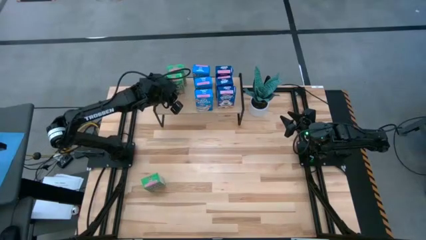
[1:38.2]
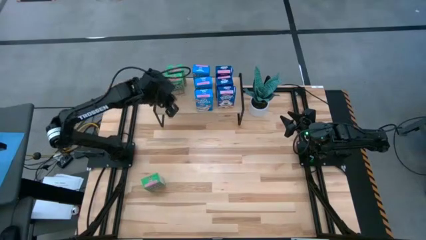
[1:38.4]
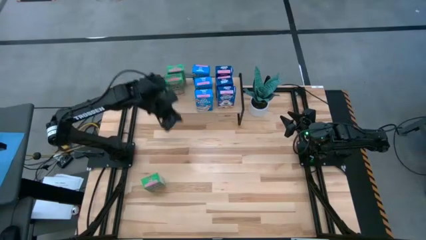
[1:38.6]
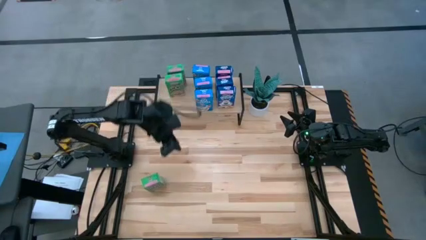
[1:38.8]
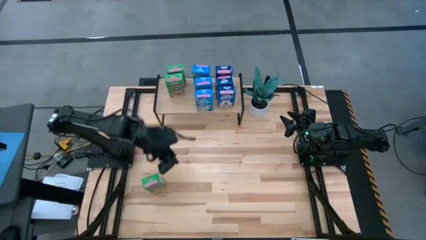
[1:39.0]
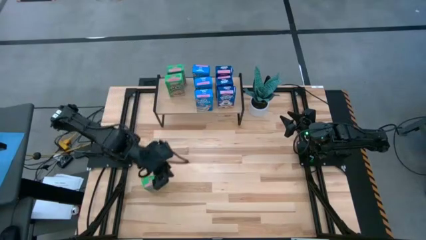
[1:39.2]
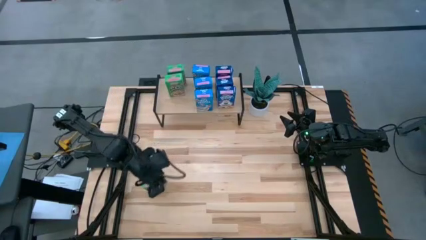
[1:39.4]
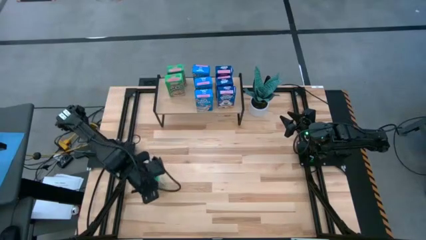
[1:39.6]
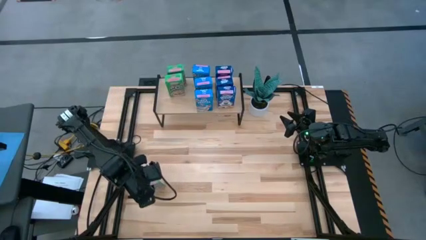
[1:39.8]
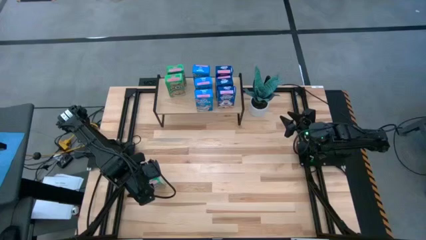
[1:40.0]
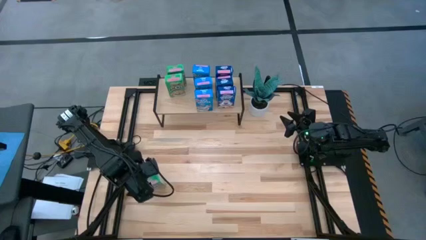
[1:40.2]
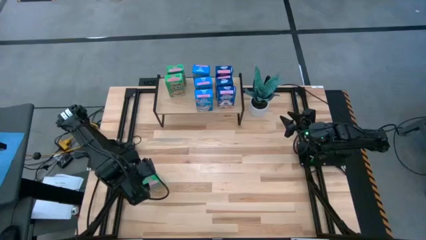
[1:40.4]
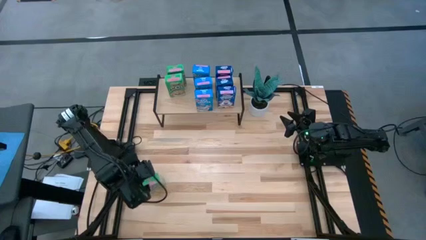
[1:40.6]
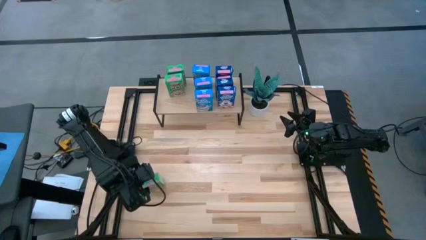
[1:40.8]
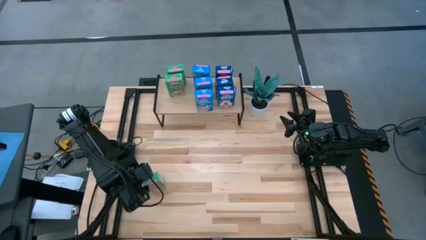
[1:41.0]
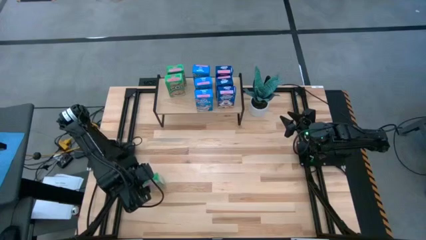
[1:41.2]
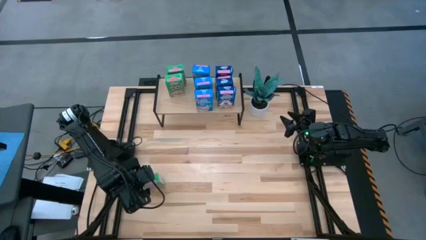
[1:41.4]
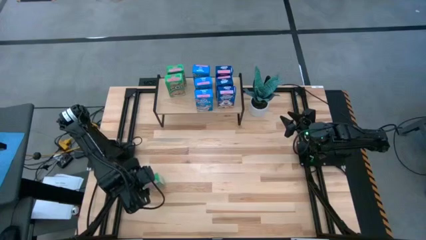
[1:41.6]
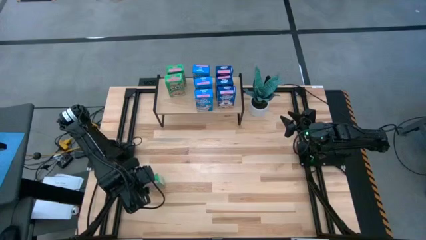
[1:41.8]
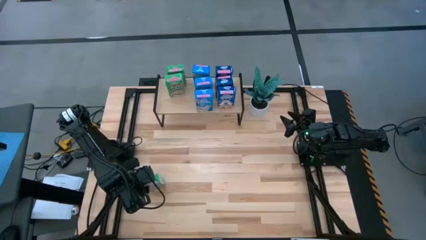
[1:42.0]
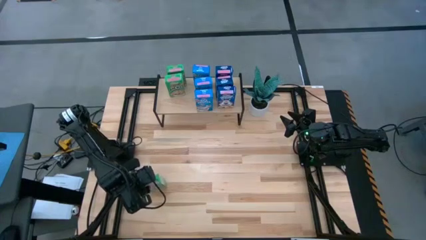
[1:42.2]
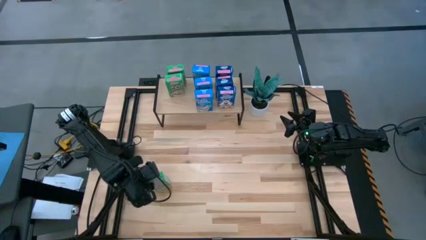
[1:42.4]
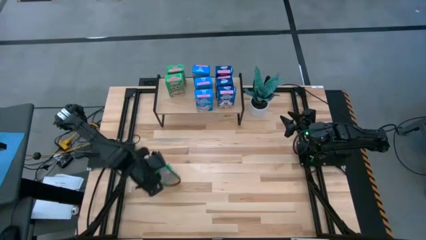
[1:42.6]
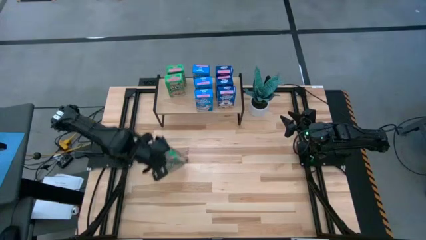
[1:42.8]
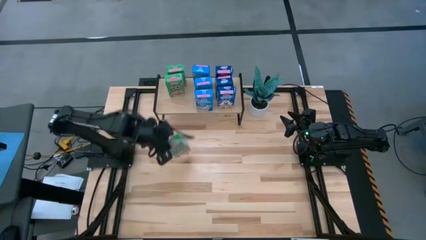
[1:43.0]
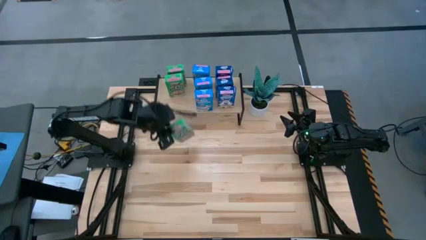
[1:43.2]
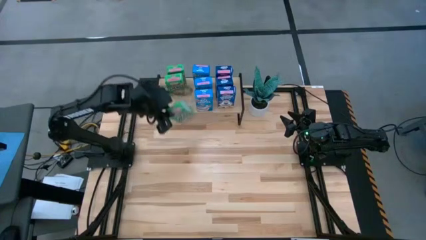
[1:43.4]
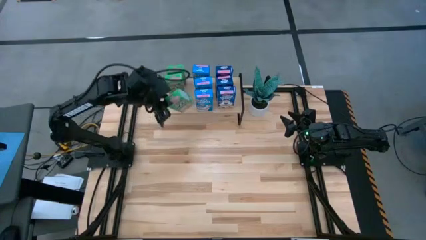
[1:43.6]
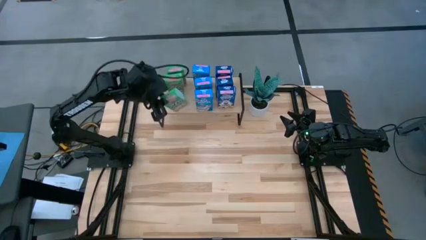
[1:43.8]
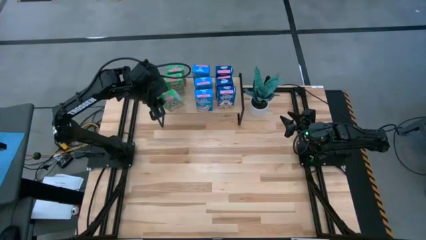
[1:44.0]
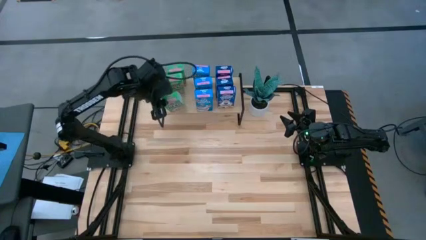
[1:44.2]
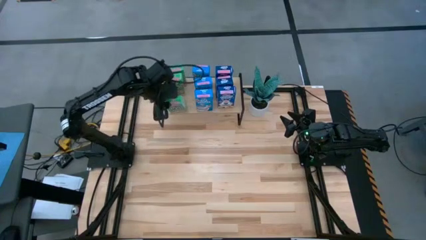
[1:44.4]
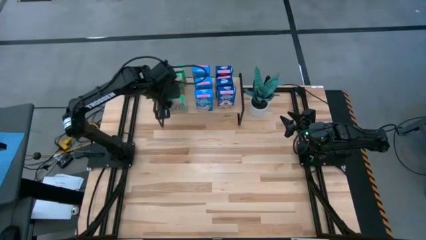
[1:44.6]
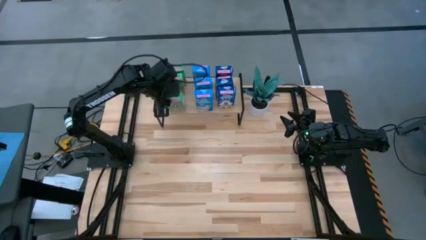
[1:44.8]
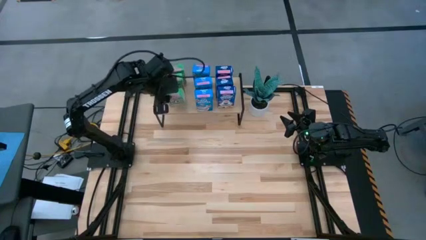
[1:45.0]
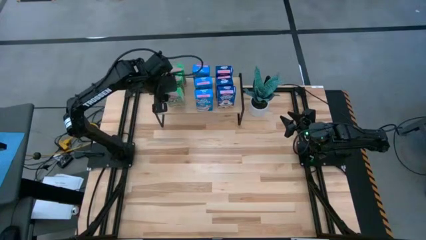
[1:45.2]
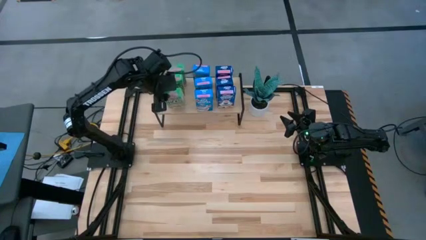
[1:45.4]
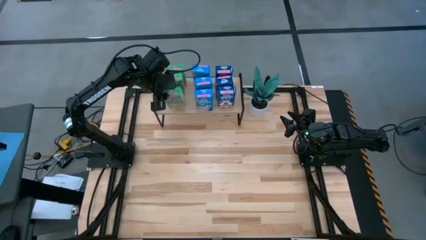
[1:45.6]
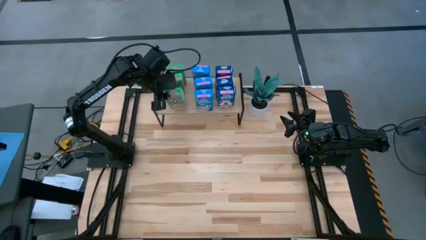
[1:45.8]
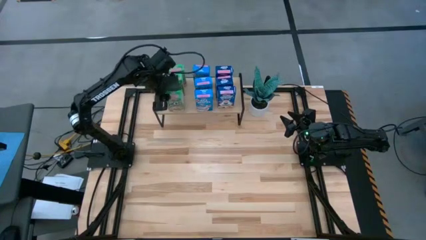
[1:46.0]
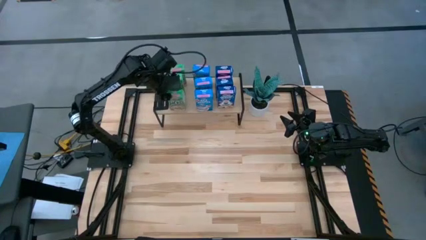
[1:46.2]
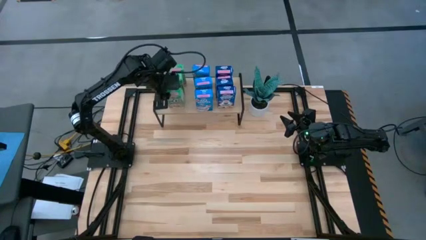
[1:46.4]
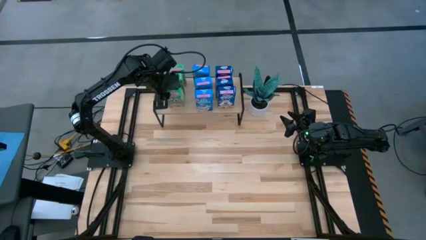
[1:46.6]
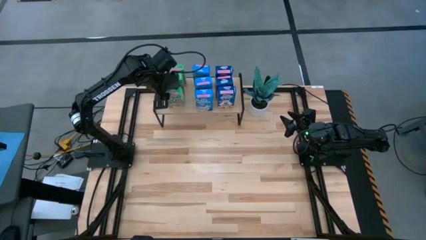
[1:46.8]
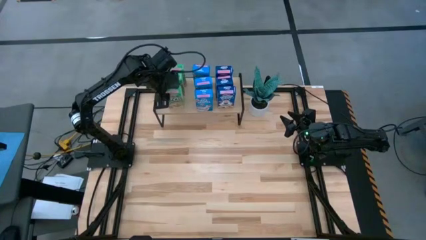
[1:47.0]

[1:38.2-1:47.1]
Task: Stack cereal on shelf
Put the green cereal box on the shelf aligned with the other green cereal boxes

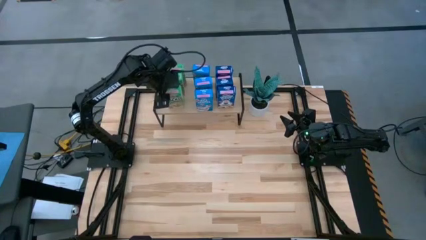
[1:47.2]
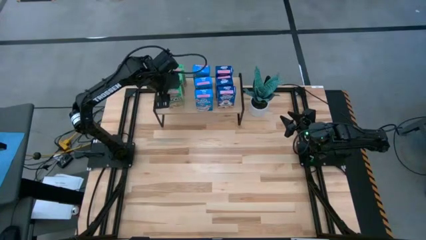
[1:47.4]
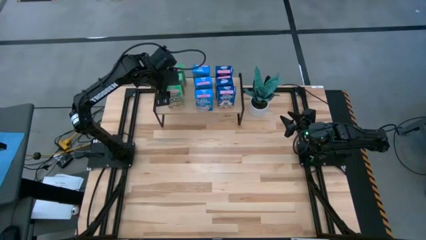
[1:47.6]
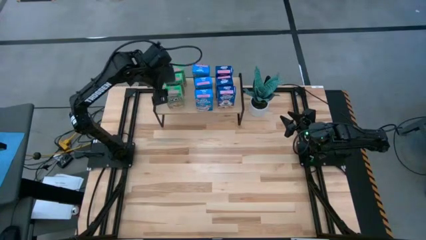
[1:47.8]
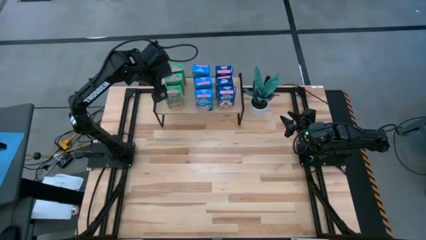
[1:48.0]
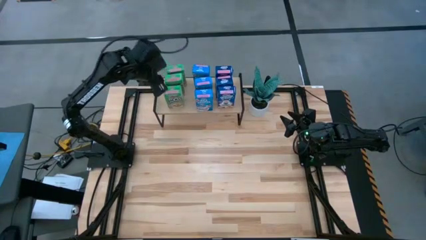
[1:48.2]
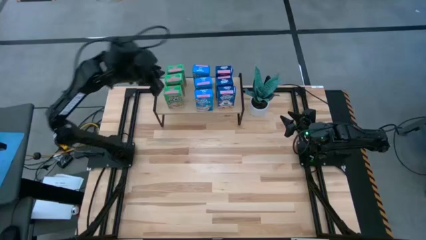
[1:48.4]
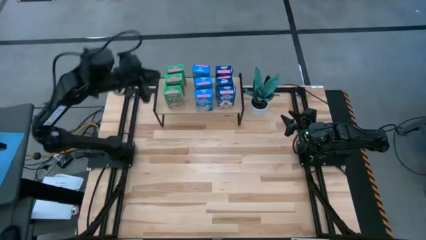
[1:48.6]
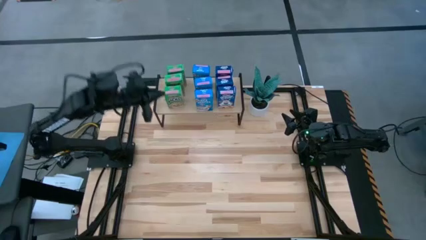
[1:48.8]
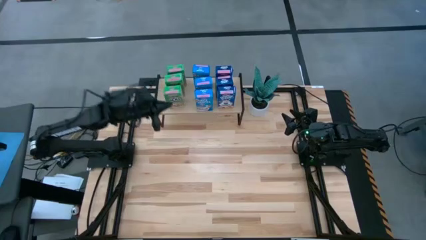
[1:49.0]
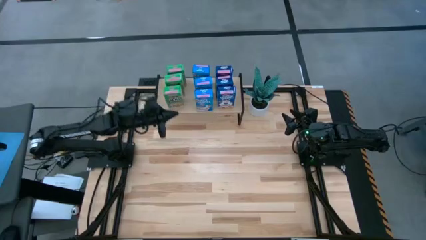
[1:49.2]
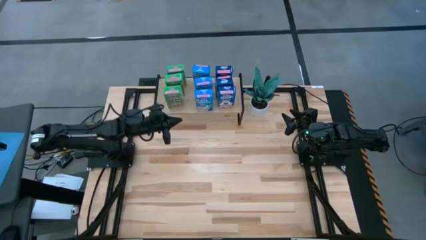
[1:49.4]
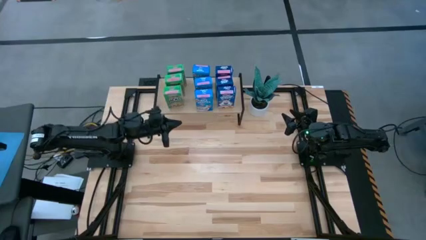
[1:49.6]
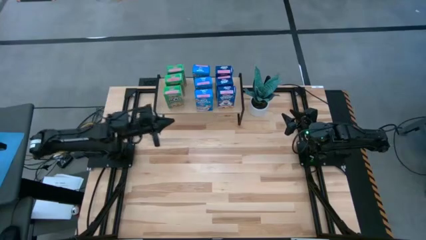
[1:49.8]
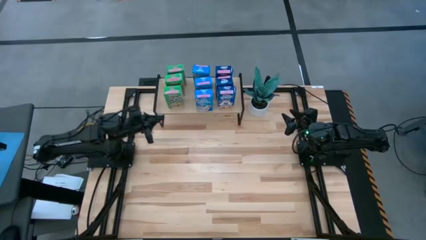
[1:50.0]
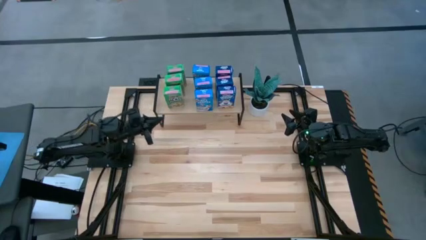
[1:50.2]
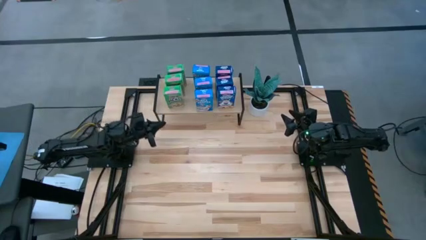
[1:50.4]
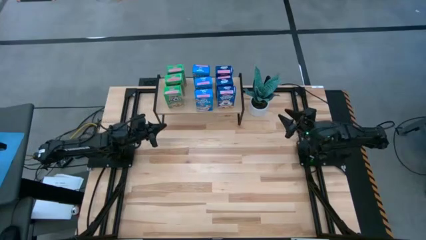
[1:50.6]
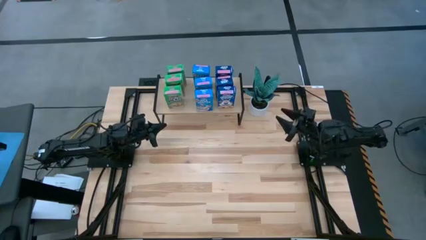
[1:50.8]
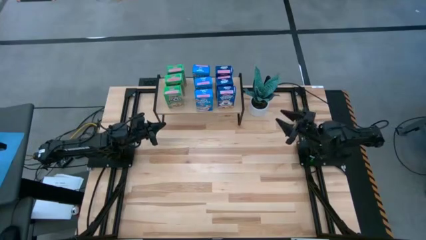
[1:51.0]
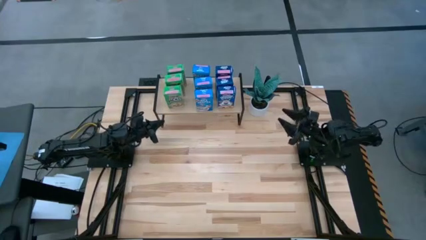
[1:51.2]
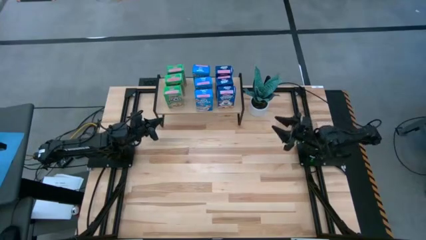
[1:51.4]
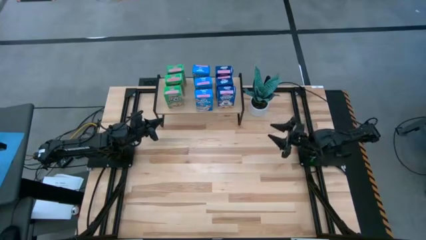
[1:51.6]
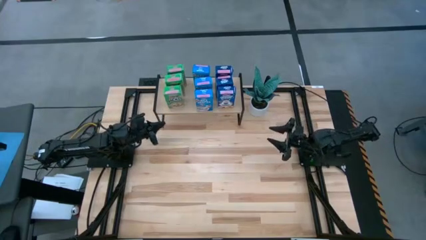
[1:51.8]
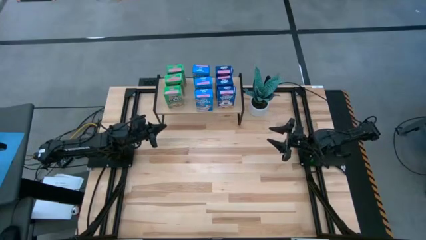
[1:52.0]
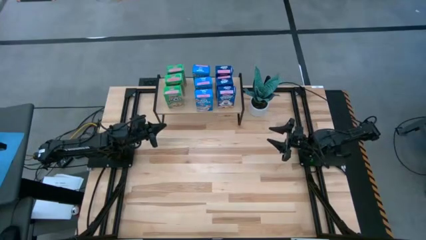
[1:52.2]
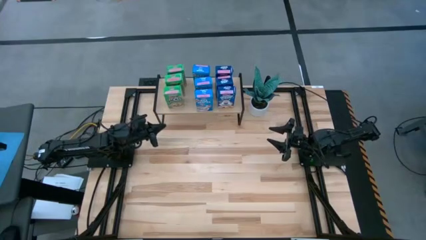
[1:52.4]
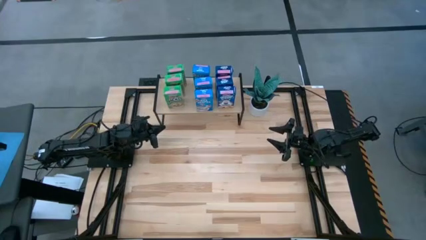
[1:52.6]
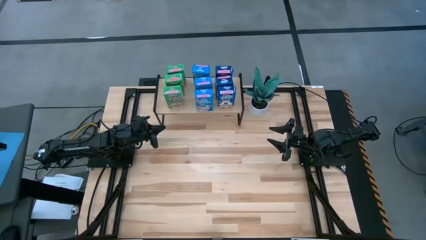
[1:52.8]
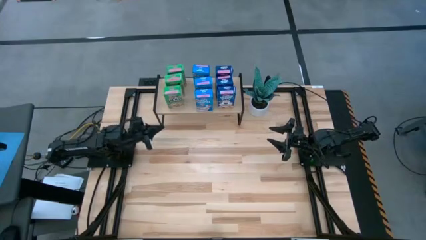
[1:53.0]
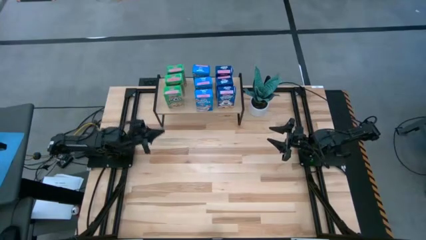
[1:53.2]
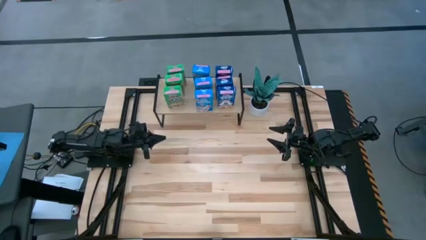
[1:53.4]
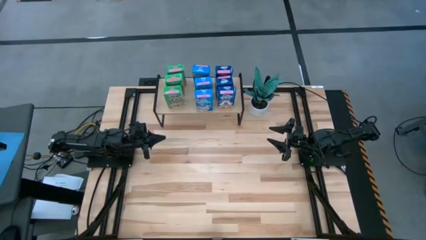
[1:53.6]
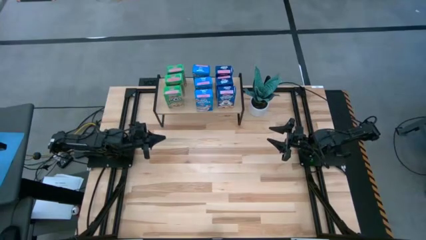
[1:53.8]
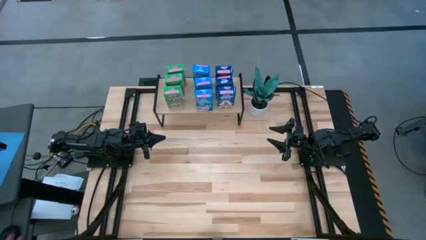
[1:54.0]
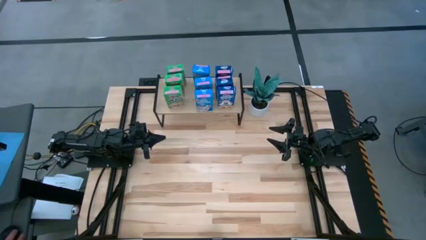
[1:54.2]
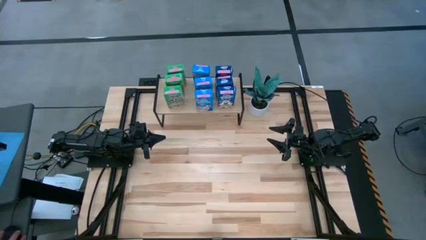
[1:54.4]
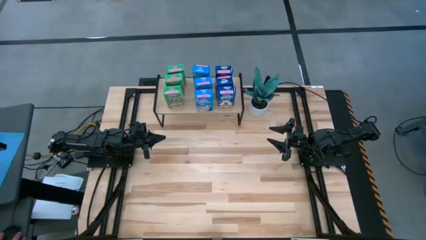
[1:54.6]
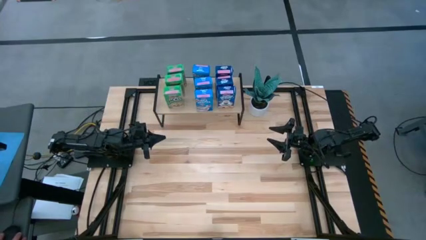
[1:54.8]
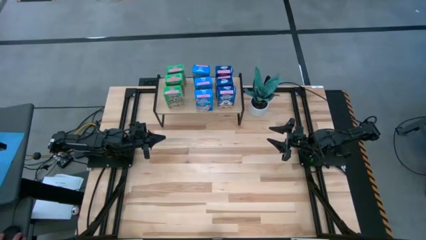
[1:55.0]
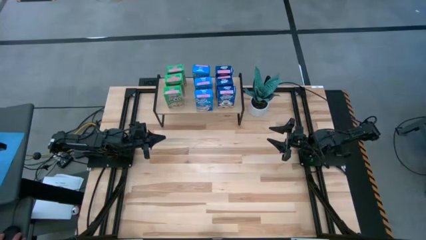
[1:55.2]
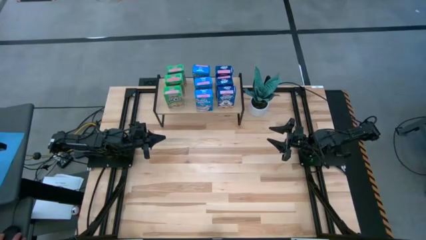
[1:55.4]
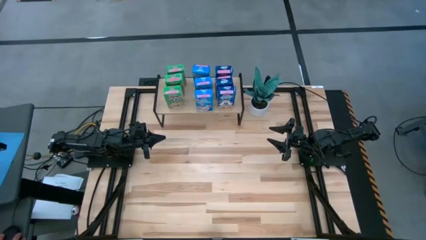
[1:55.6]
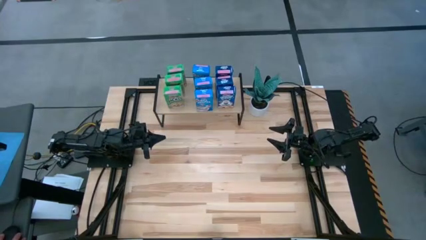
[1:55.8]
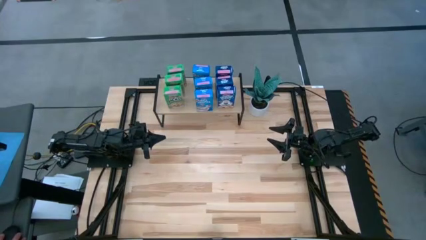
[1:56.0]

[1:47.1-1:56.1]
Return to Home Position
